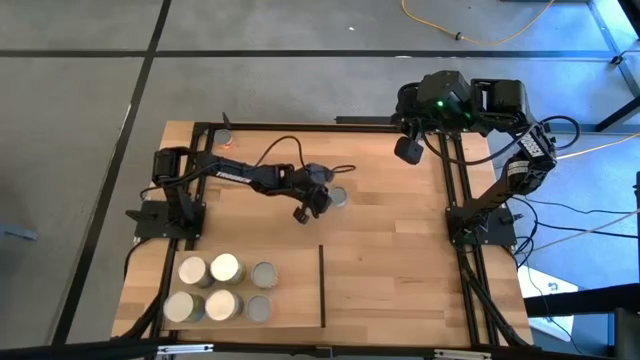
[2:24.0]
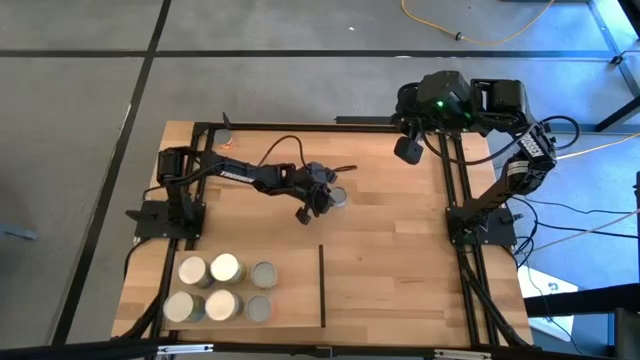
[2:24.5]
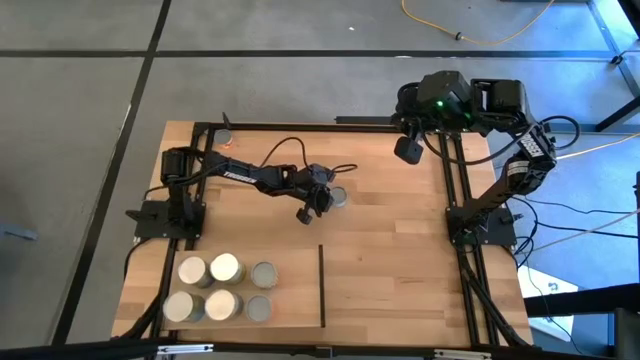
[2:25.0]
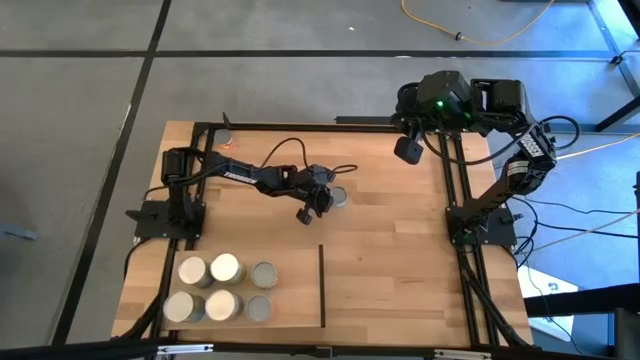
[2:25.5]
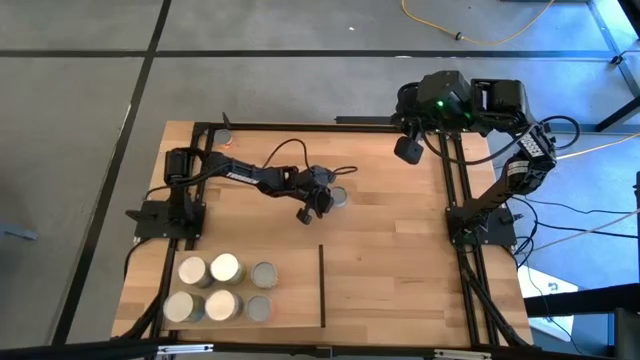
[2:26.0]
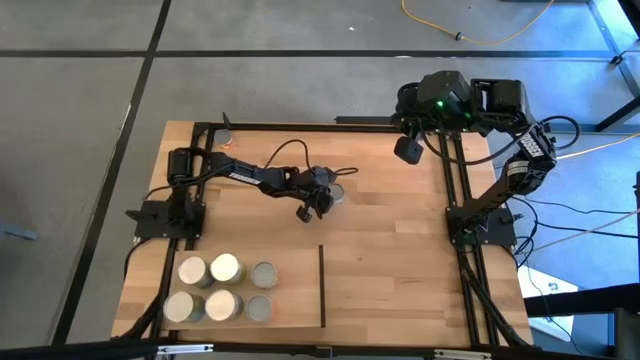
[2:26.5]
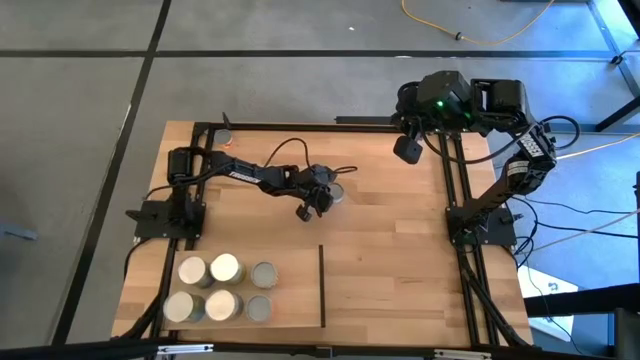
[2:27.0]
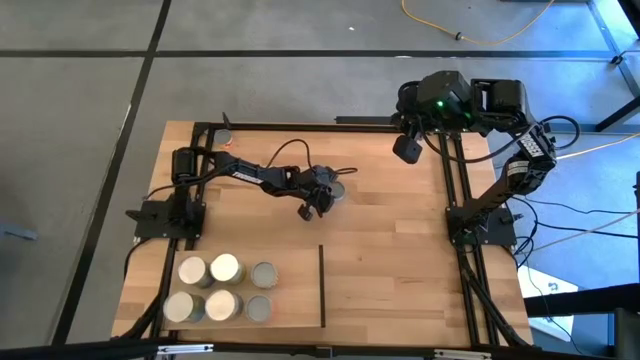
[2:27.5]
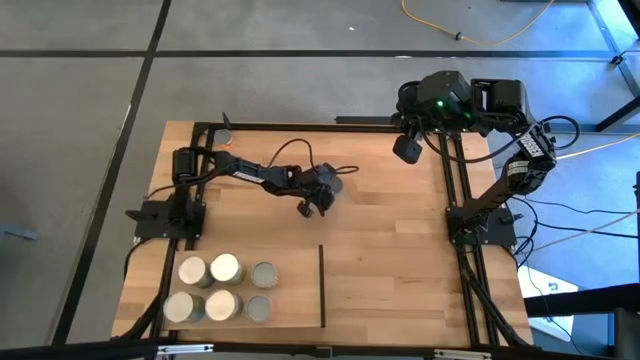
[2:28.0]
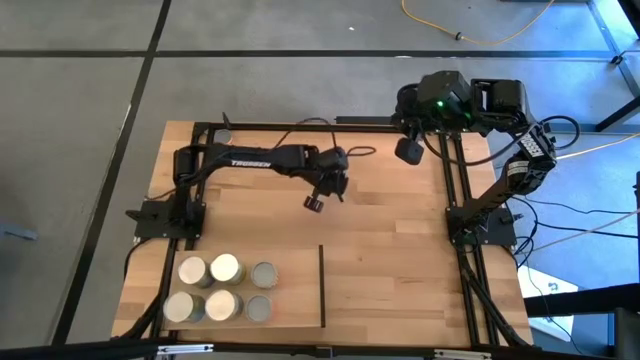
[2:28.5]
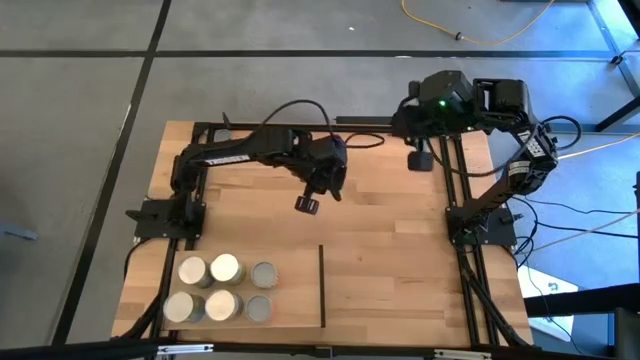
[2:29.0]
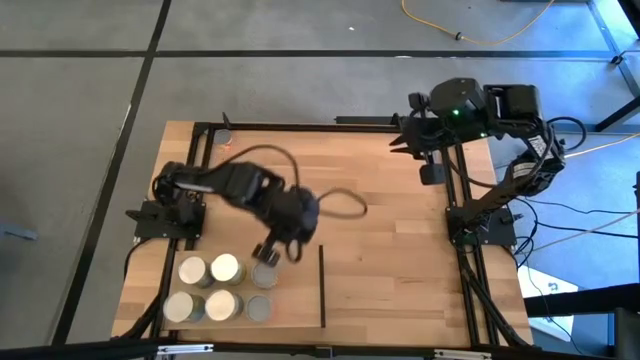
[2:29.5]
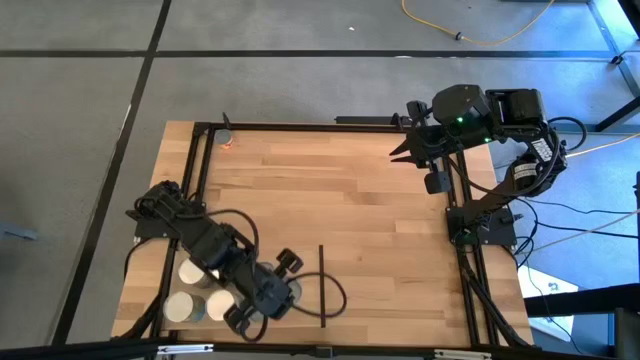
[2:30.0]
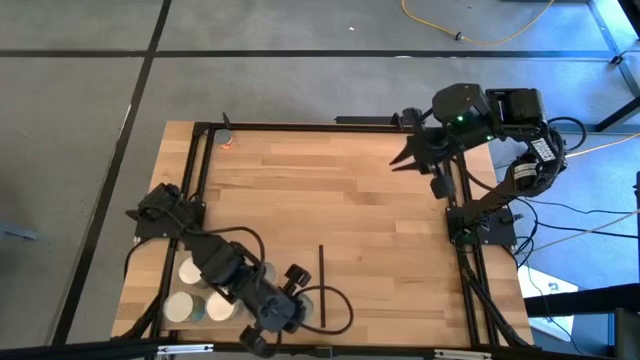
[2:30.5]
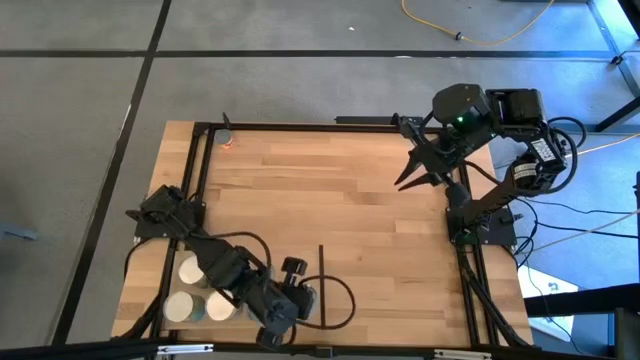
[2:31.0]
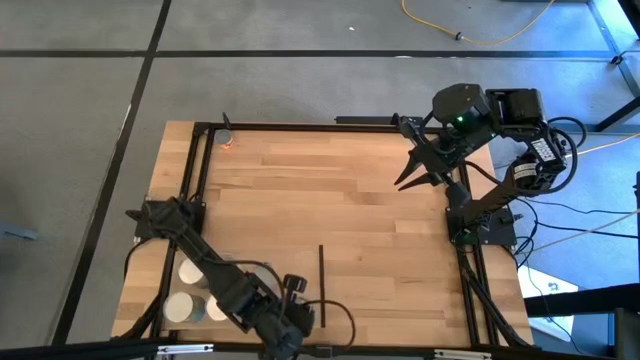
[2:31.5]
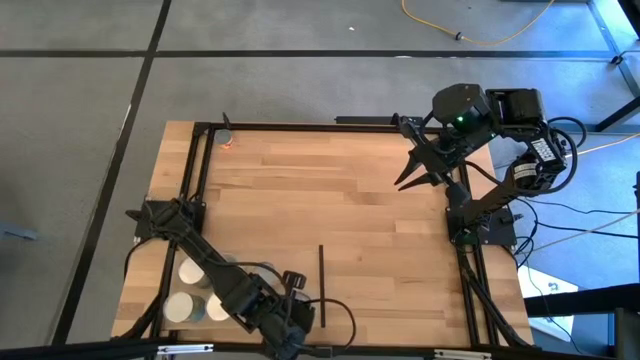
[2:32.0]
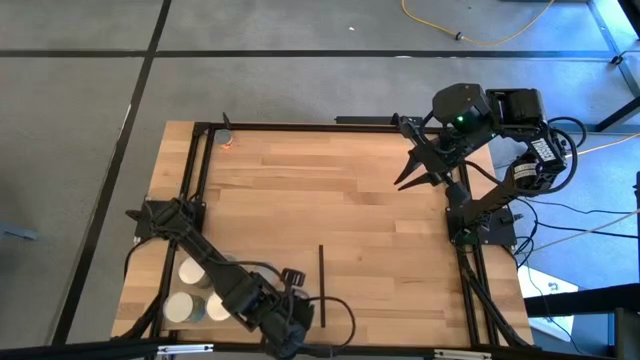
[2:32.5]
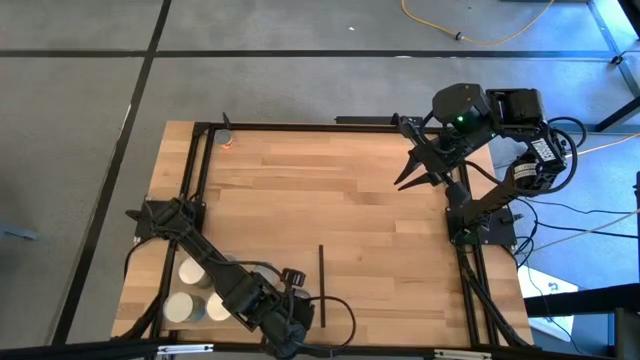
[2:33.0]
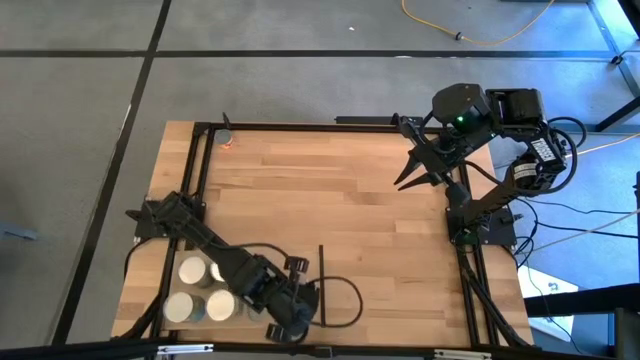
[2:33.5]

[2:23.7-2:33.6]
Task: Pick and place cans onto a shelf
Put the canned salmon on the shelf

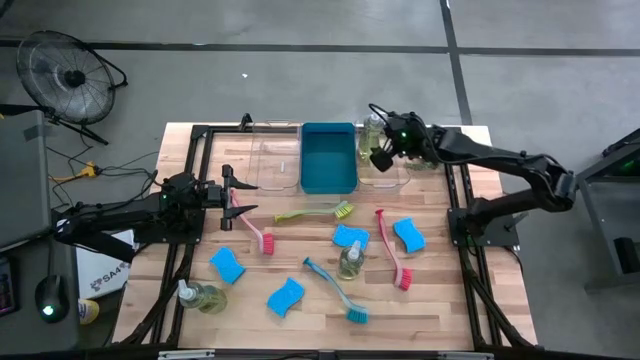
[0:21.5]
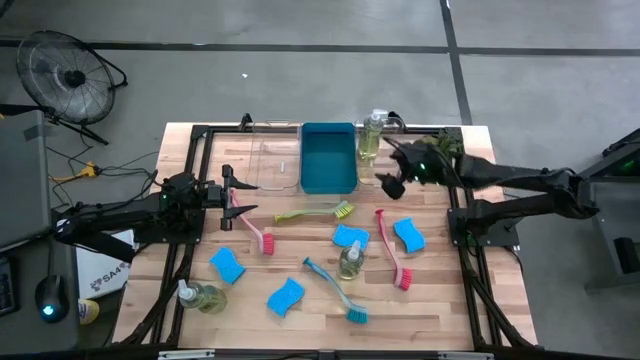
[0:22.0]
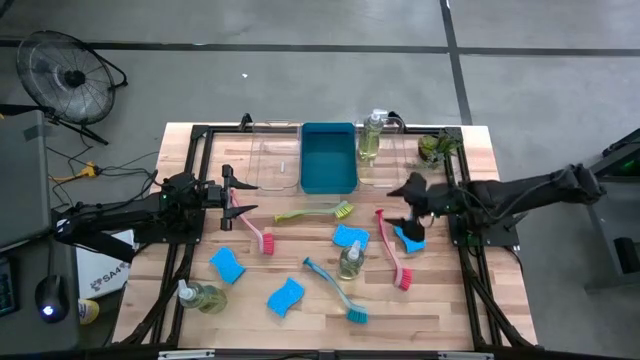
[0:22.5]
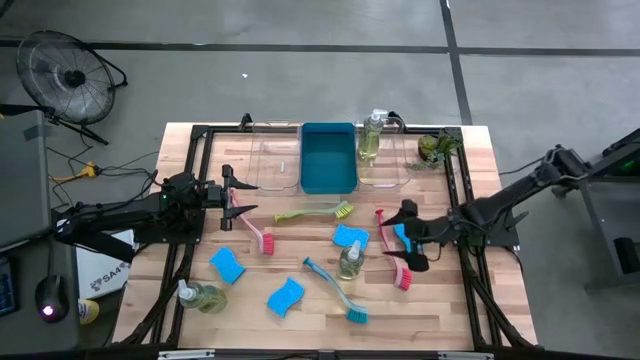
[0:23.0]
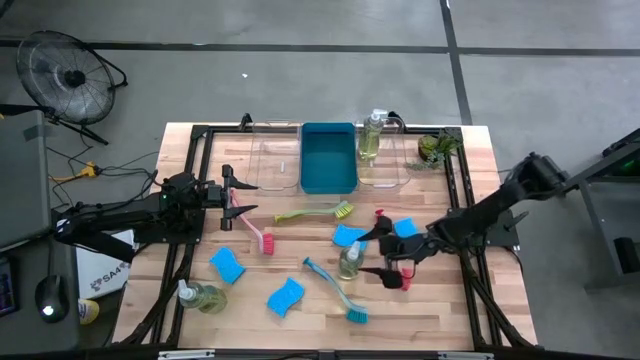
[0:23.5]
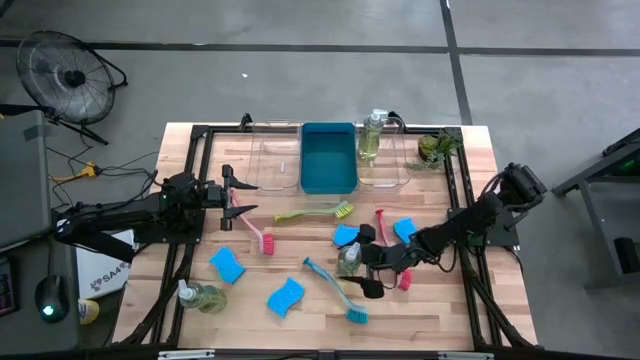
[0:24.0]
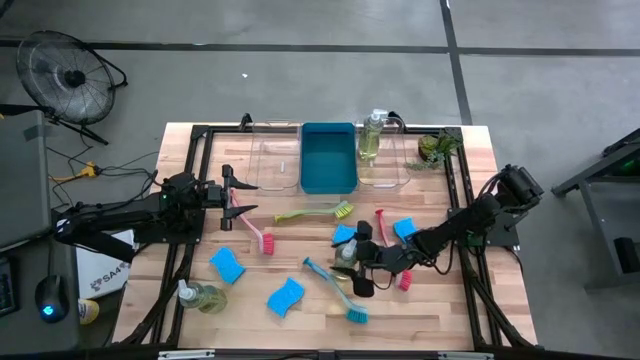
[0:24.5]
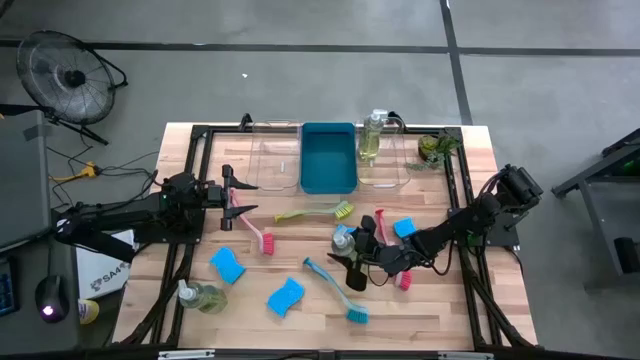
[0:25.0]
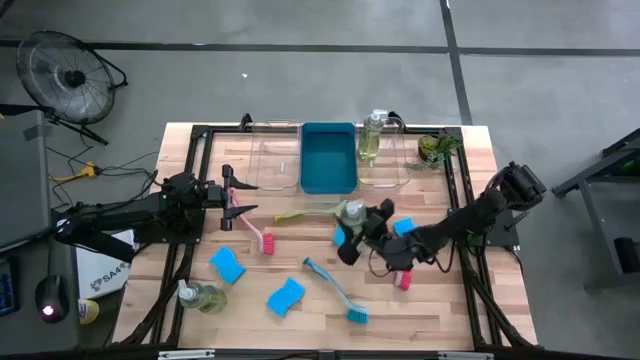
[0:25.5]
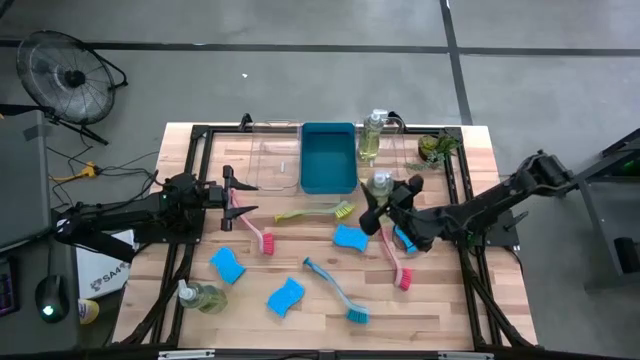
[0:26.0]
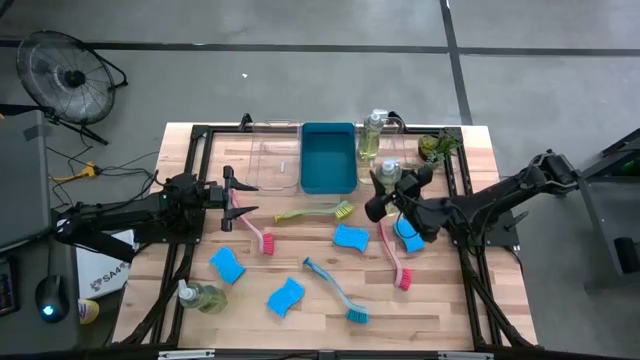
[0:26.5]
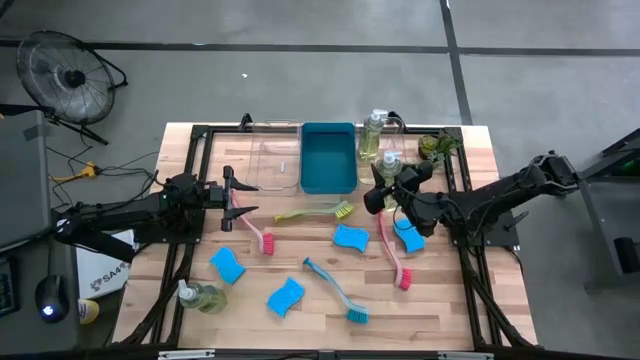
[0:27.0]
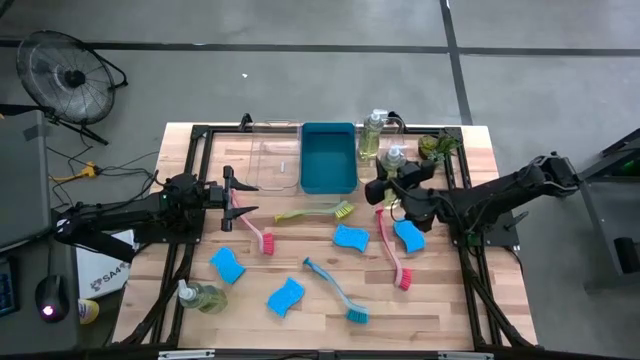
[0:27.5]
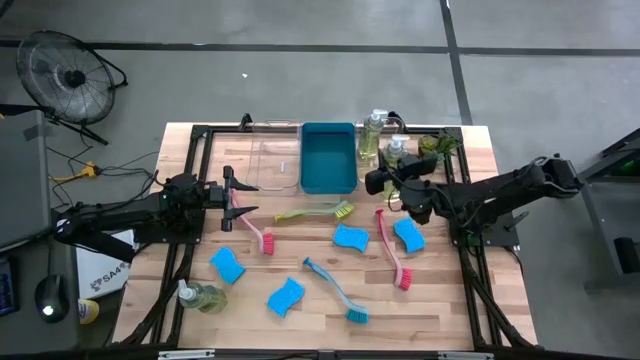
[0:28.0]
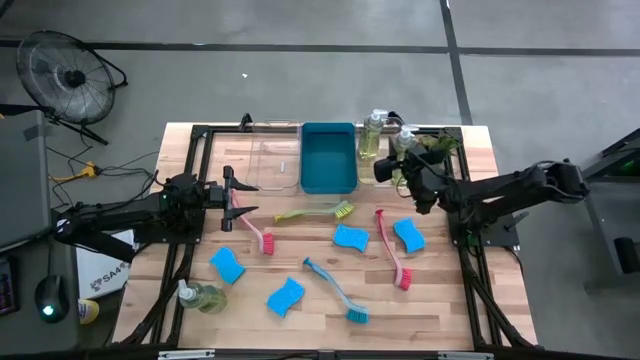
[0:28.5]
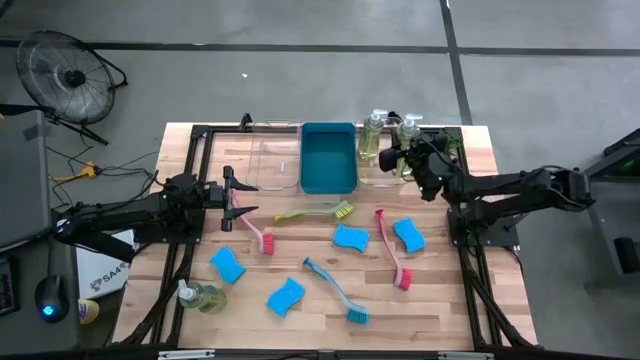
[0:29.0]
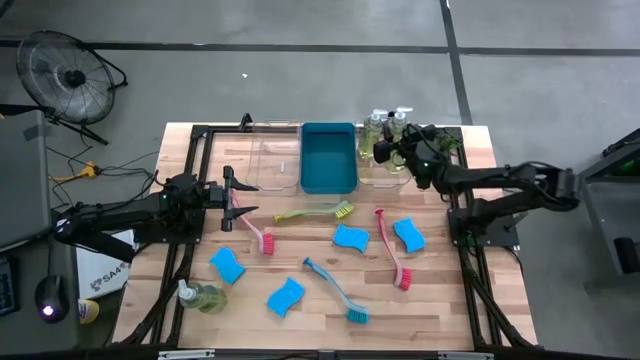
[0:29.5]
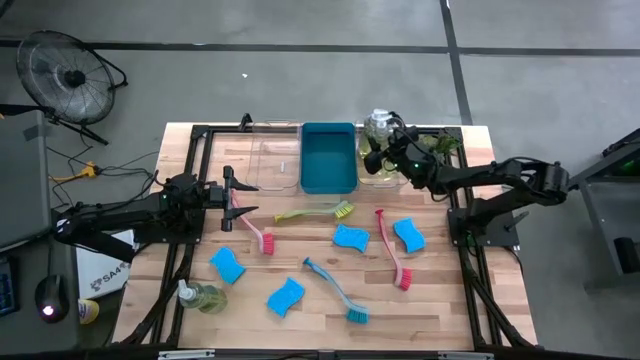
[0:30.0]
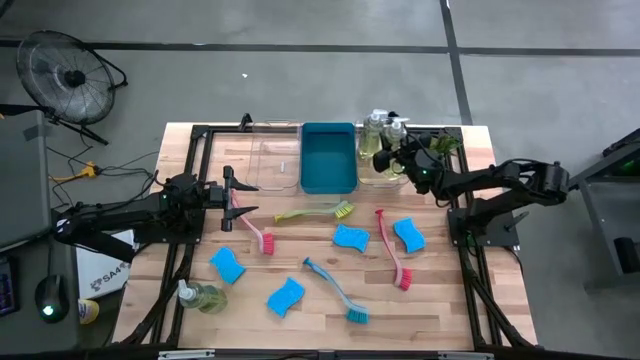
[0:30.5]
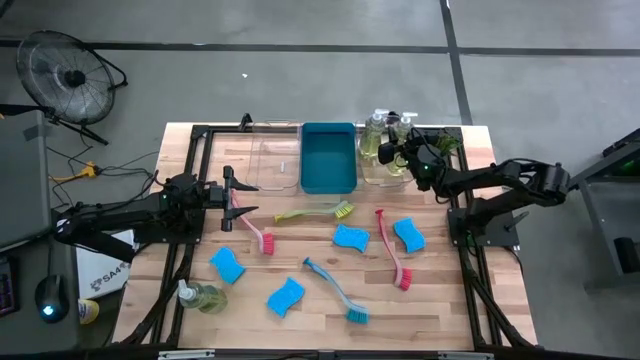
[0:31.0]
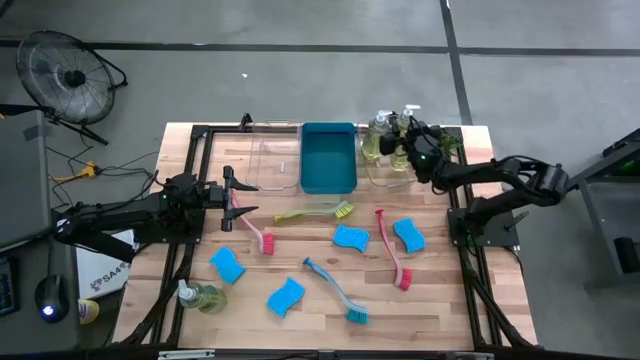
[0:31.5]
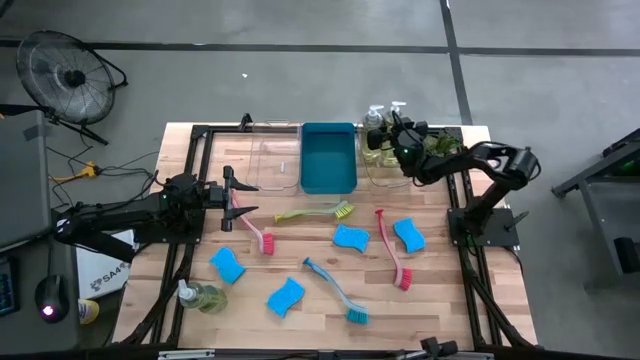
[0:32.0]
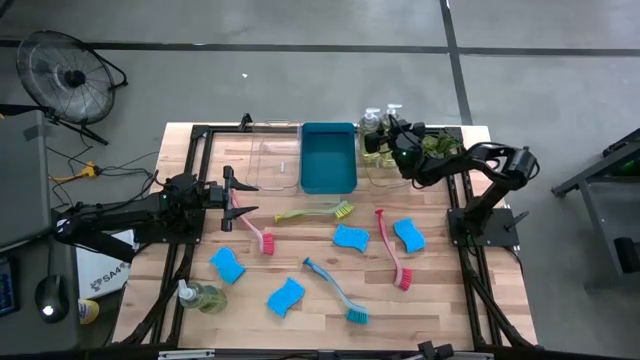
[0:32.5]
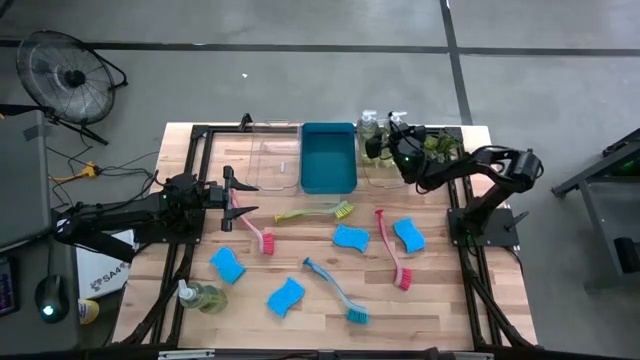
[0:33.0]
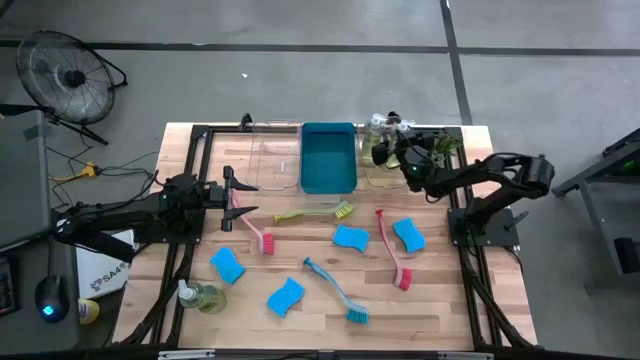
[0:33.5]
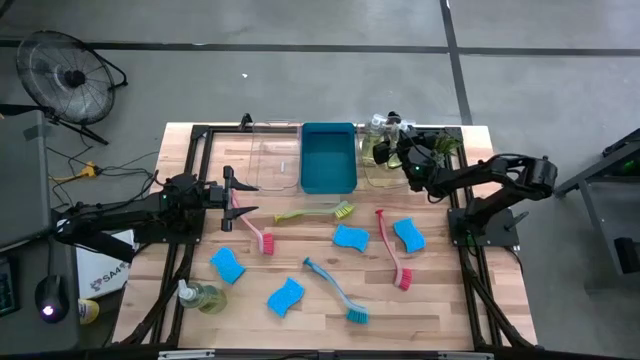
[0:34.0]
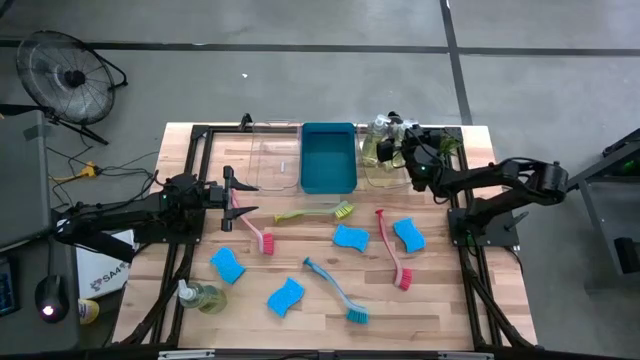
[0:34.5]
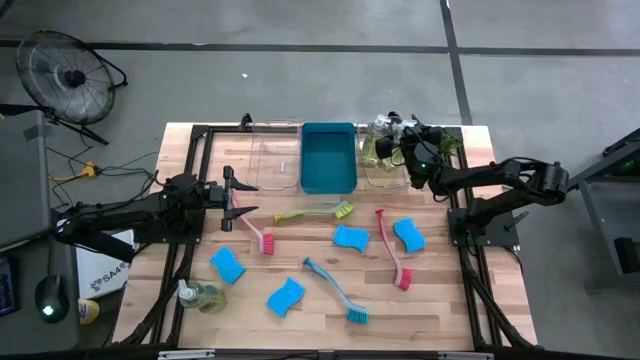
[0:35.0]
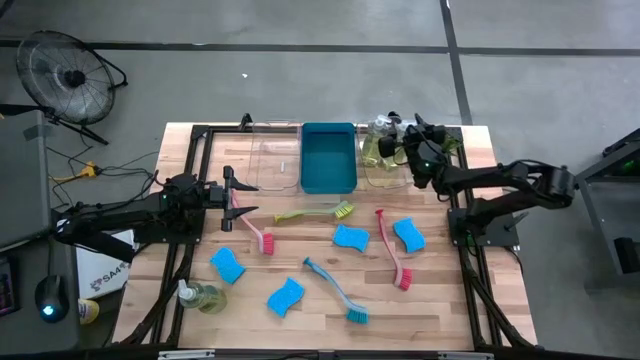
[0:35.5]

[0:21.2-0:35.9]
Task: Pick & Place Kitchen Sink Supplies
Put the green dish soap into the right transparent bin
